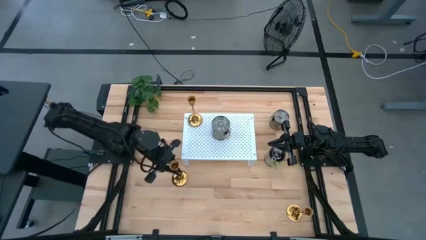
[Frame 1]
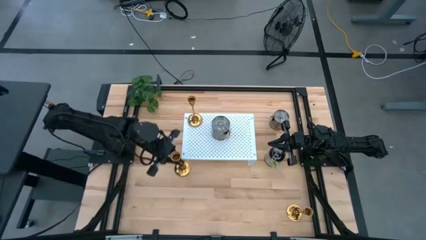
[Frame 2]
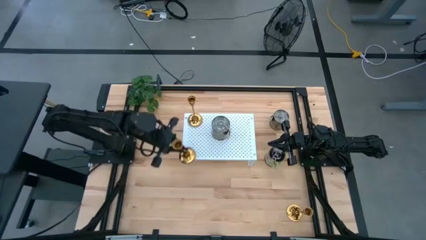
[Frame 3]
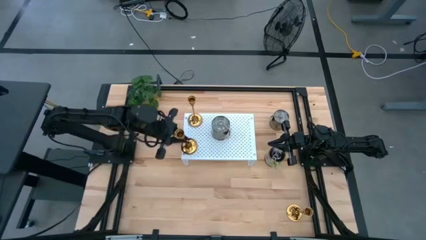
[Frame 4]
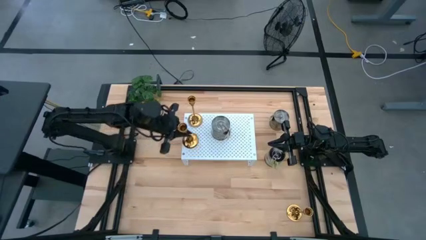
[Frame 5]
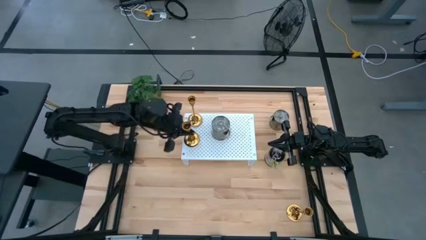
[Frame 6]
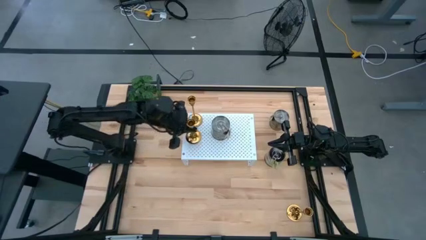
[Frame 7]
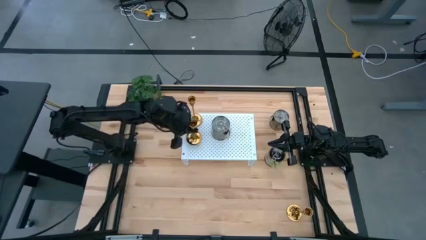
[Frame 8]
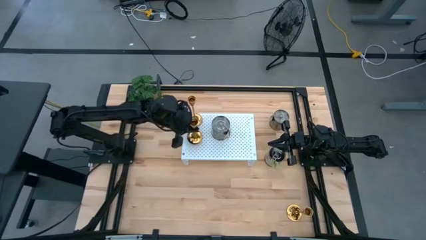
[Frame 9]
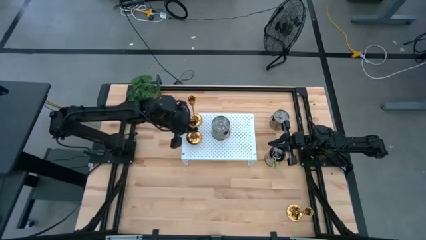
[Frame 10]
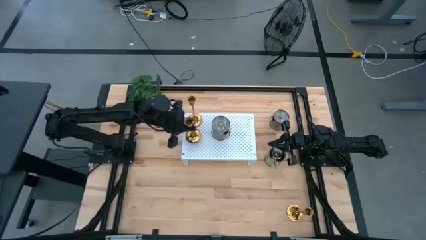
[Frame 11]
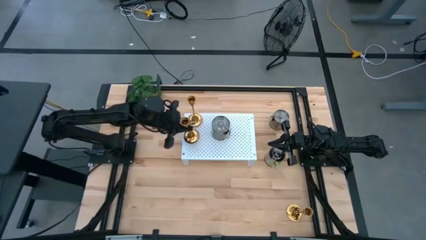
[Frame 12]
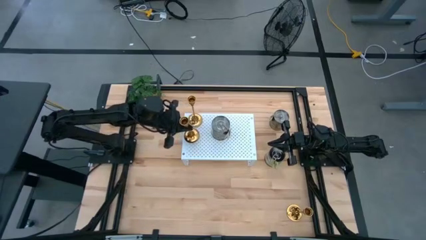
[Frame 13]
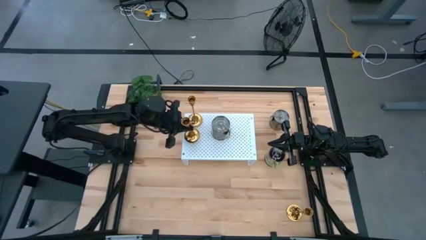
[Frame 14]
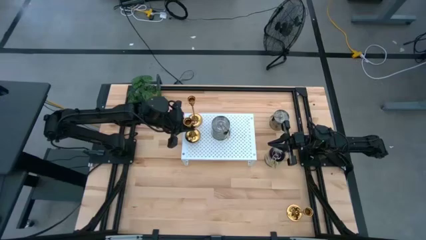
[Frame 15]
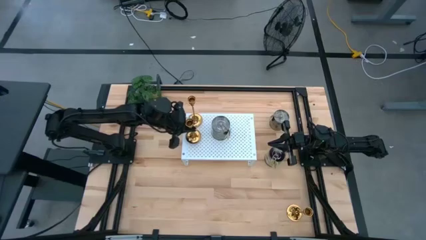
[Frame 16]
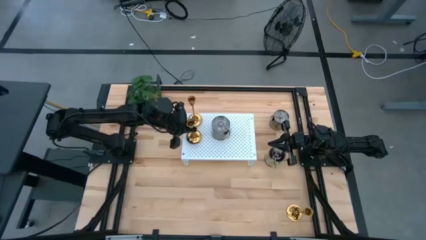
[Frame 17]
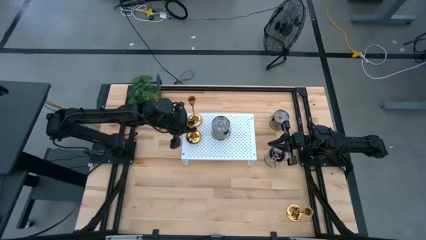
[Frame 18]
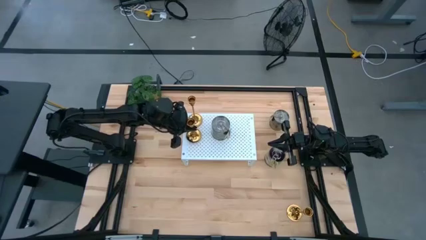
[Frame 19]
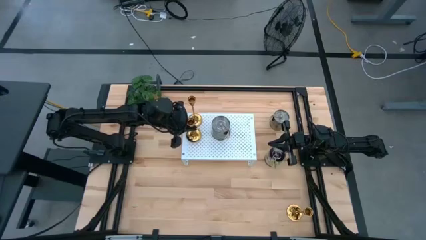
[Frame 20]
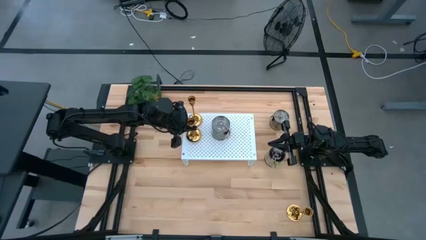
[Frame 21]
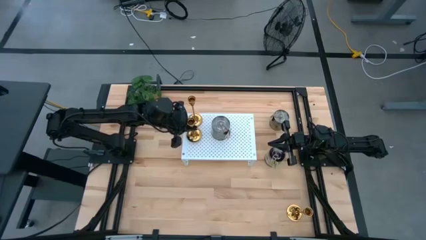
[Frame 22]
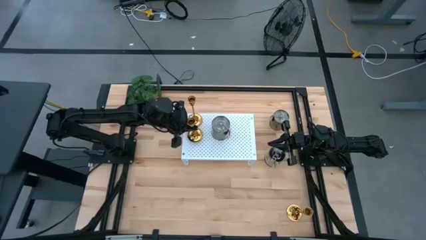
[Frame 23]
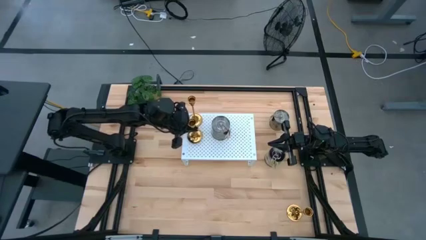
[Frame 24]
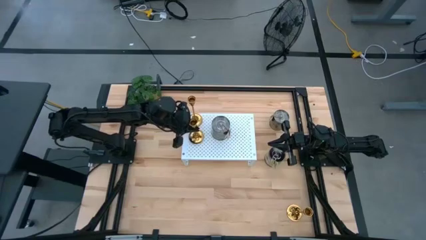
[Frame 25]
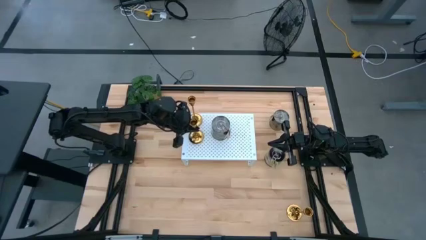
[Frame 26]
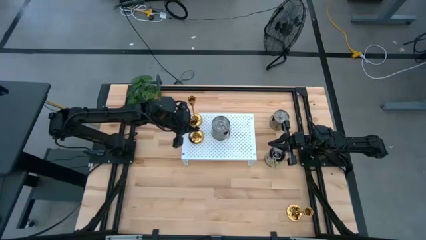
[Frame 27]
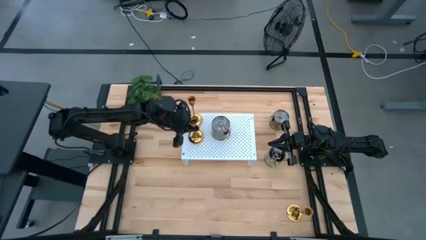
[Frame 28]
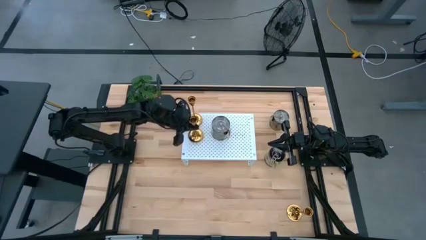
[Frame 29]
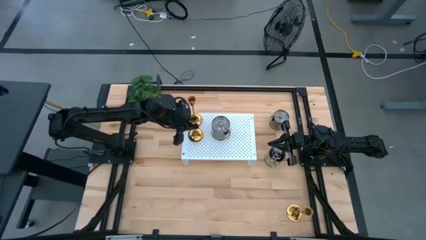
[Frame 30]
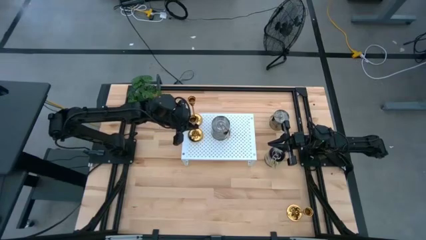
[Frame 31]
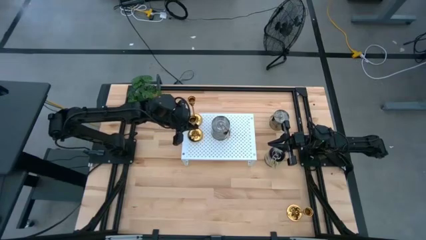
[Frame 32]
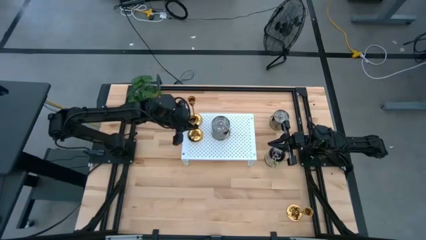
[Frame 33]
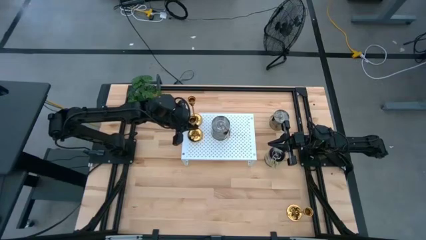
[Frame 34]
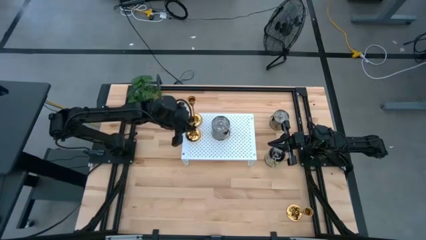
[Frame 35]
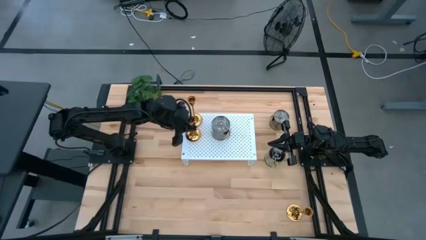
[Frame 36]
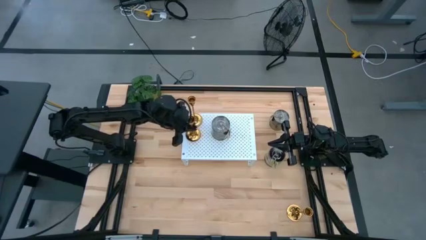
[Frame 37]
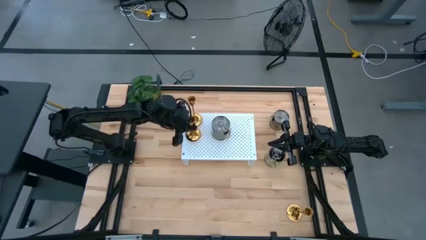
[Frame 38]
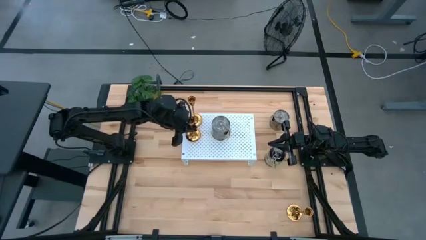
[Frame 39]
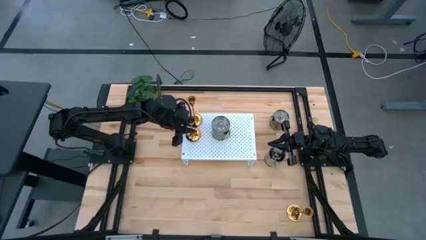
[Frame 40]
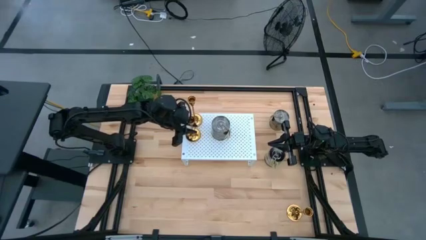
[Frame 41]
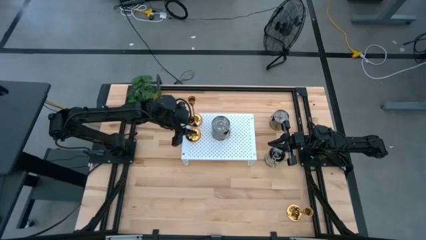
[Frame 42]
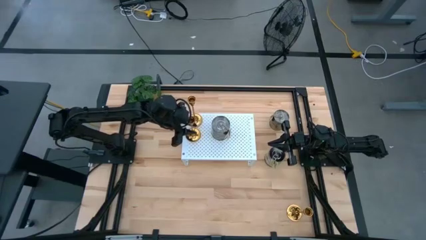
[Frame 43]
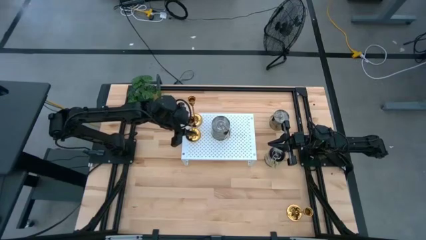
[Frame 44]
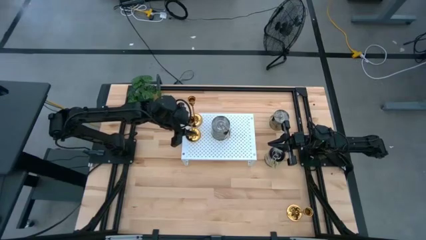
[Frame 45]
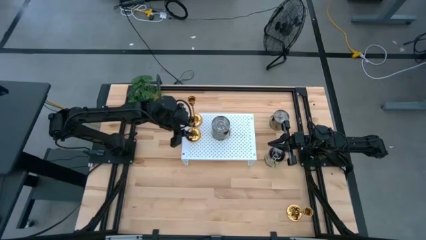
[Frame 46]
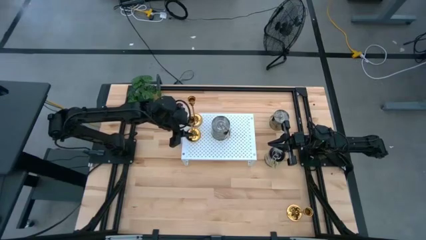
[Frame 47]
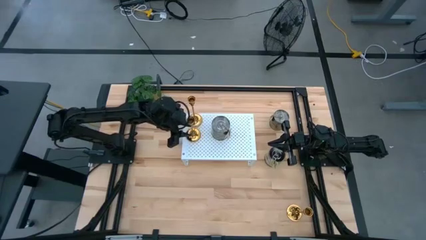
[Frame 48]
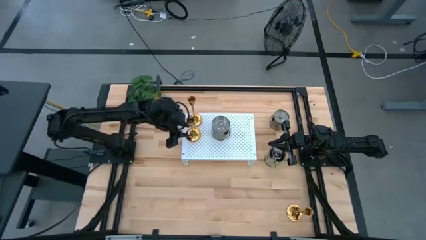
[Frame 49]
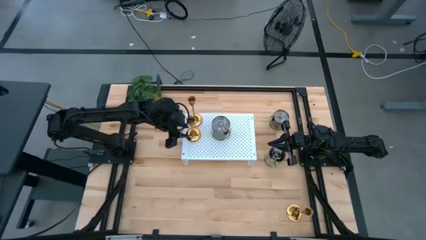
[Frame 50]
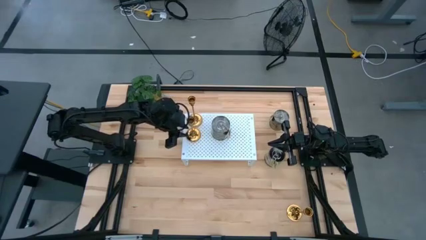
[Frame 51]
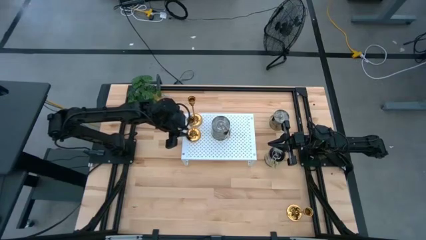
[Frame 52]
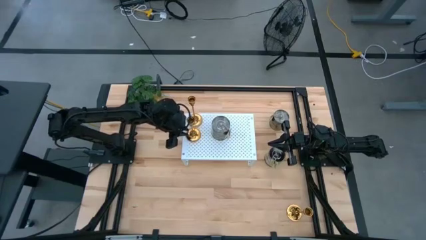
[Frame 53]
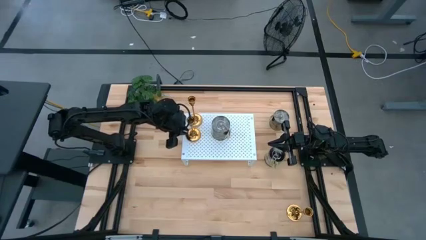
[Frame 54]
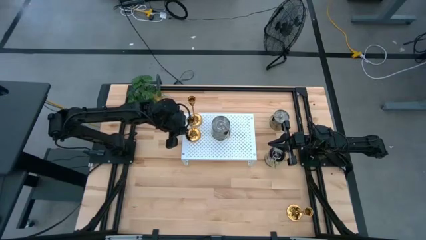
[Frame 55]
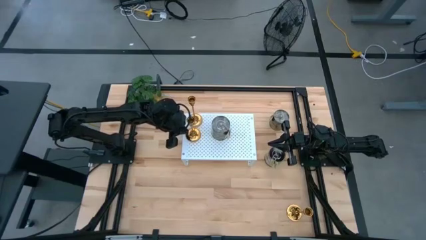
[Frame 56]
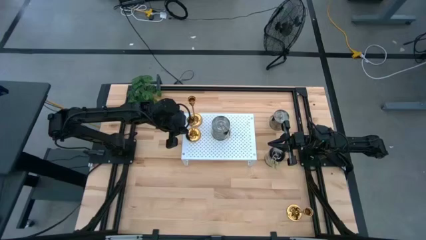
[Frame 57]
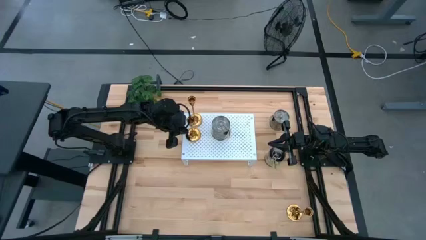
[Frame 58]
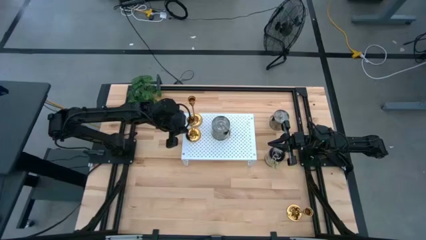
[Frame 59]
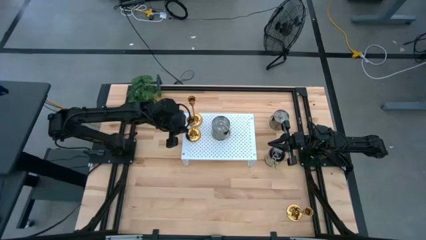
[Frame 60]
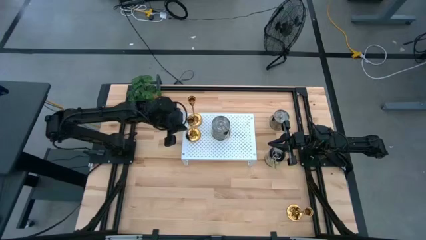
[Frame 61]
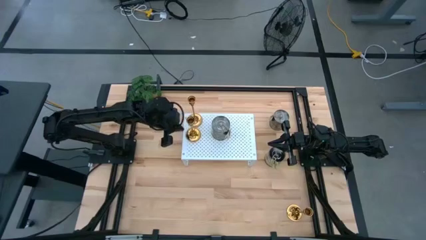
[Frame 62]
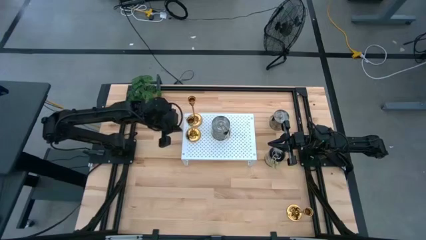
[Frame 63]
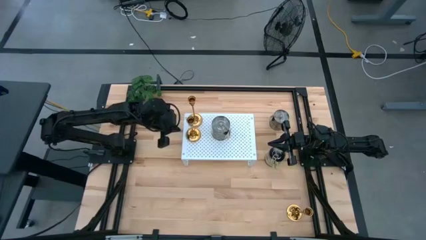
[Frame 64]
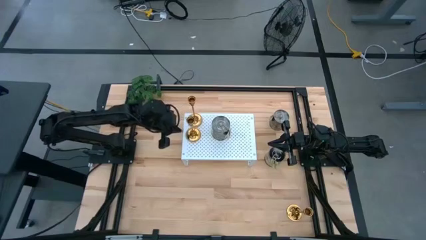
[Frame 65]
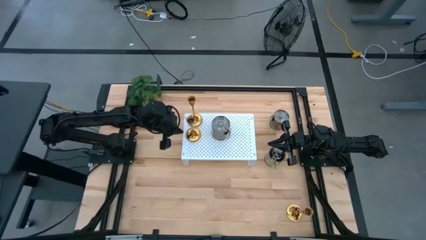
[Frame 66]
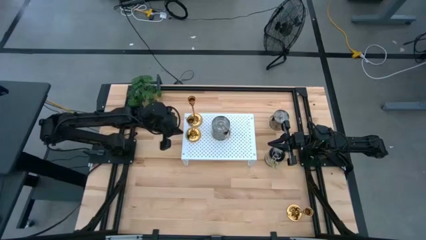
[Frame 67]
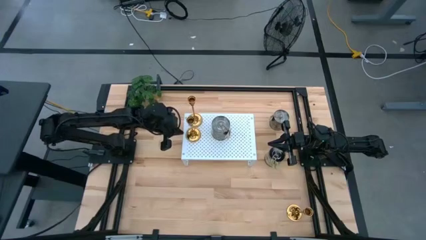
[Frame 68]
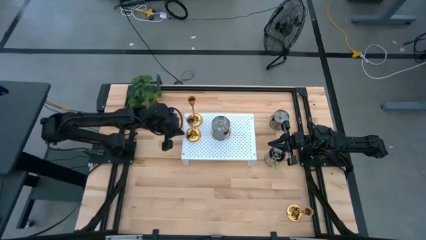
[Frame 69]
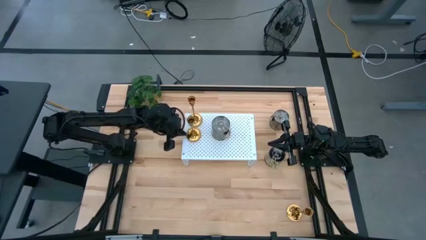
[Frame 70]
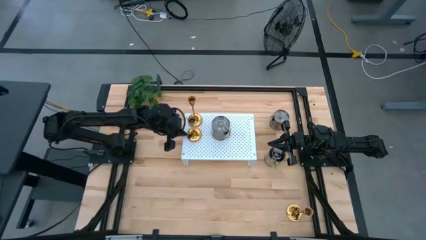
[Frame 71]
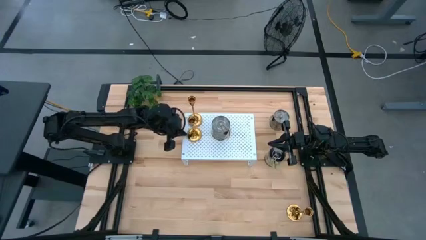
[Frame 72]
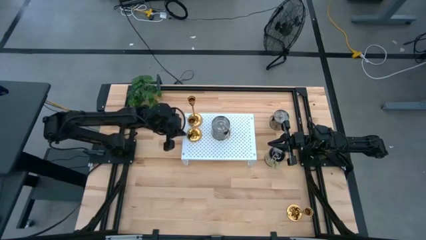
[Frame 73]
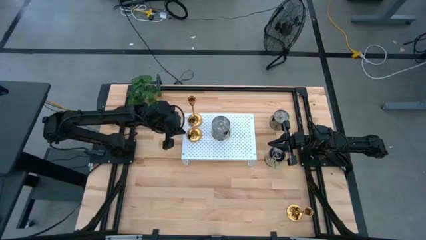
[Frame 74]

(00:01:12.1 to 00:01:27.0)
Task: Pick & Place candle stick holders
Put the left golden candle holder on the shelf aligned with the other golden candle holder

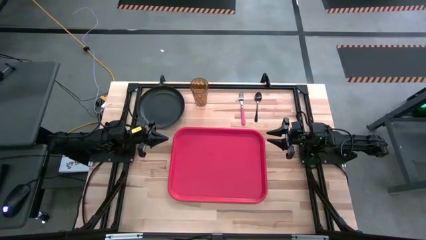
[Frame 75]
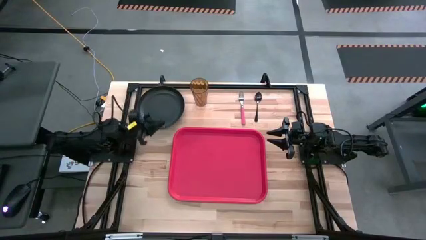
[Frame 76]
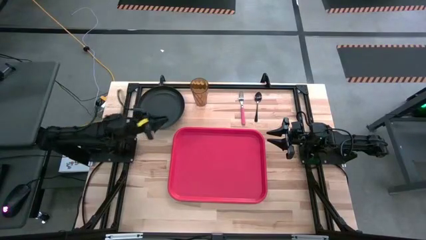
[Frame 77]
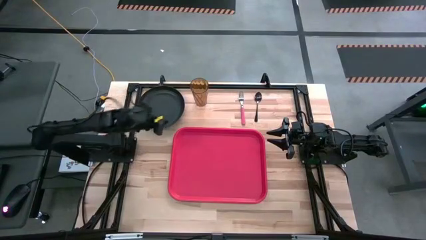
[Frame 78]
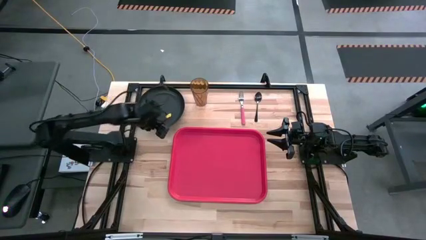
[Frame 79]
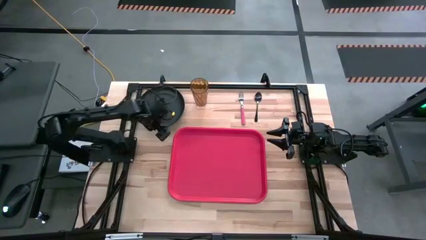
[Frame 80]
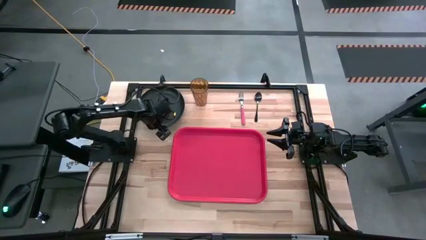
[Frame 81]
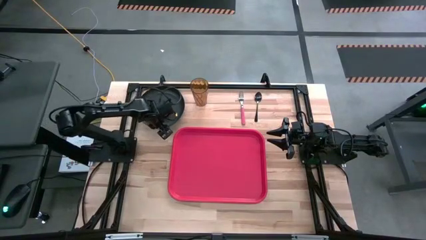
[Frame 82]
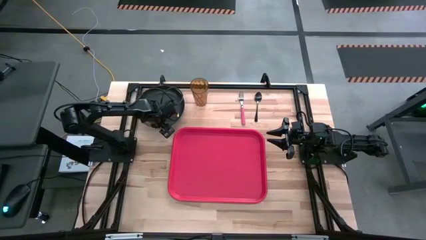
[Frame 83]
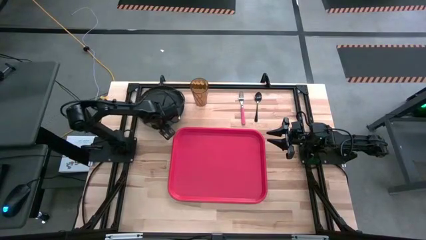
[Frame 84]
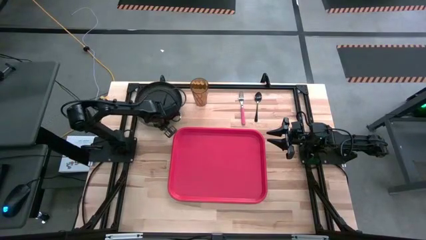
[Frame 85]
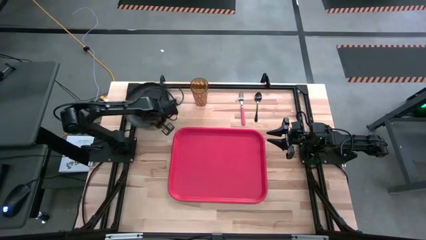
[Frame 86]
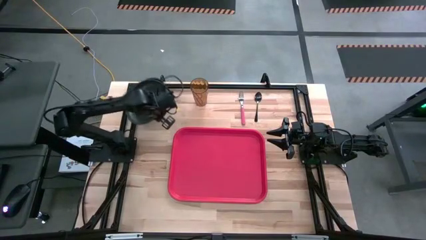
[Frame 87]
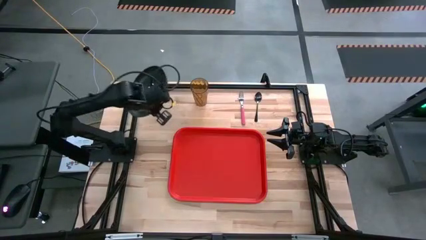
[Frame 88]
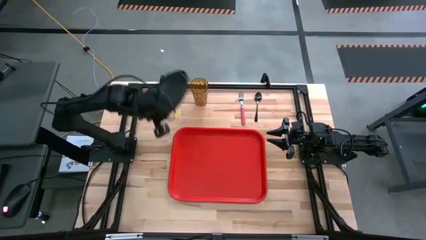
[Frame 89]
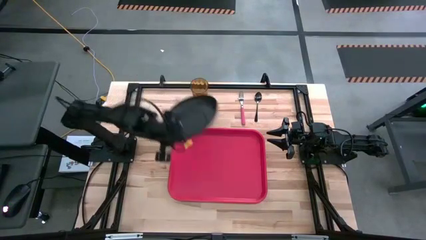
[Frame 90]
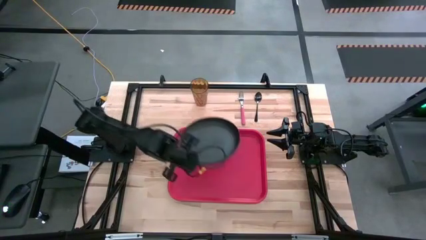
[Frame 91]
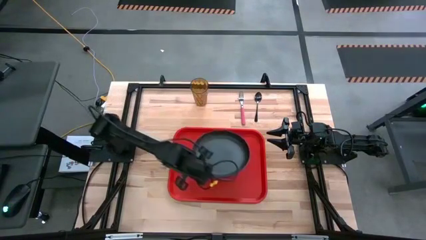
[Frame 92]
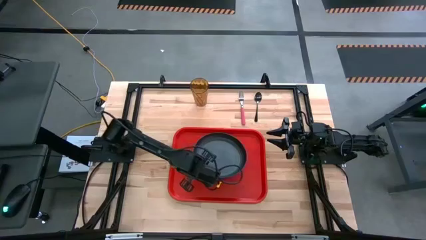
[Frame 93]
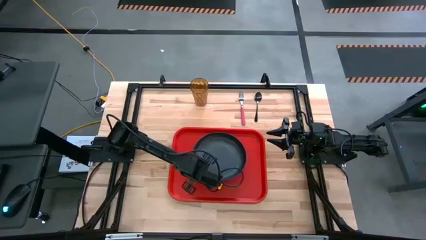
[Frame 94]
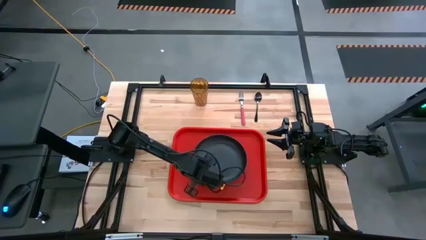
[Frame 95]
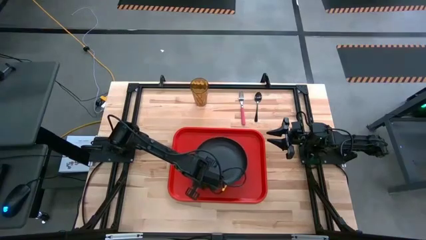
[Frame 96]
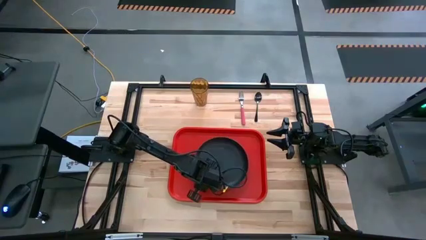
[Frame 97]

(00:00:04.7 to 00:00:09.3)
Task: Pick and place plate/cup/fork/spoon on tray
Put the black plate on the red tray
